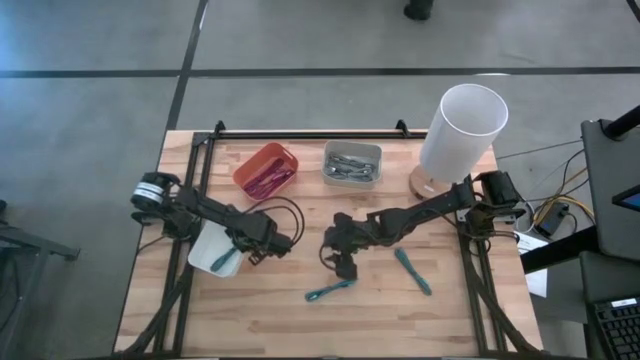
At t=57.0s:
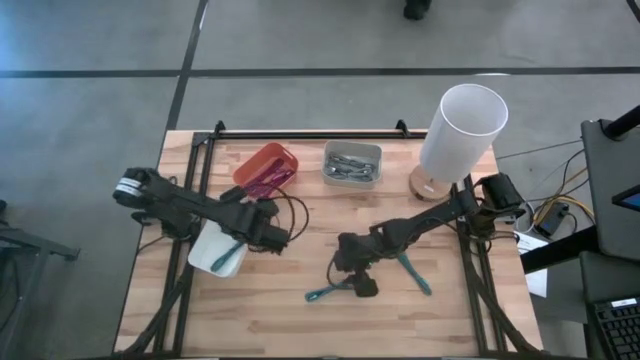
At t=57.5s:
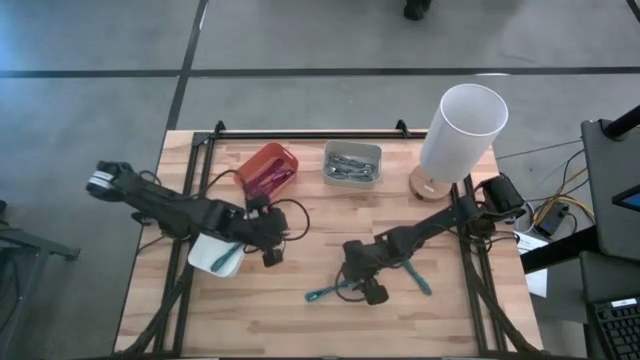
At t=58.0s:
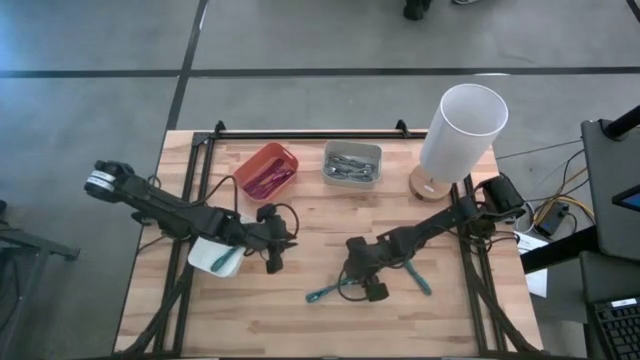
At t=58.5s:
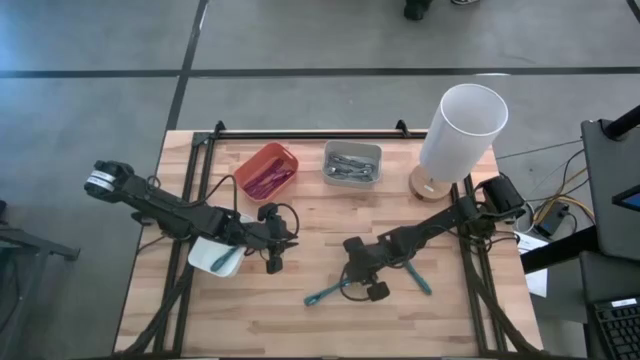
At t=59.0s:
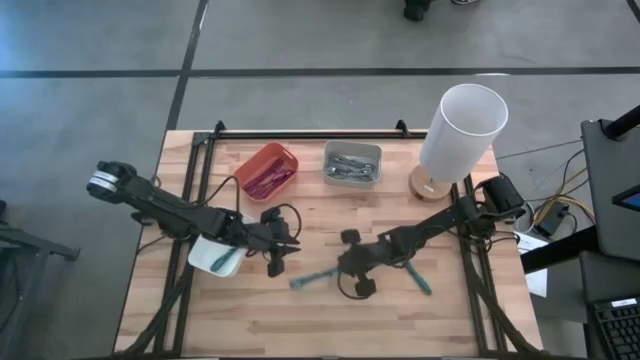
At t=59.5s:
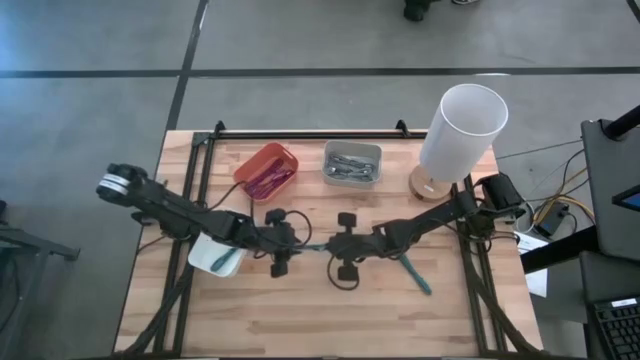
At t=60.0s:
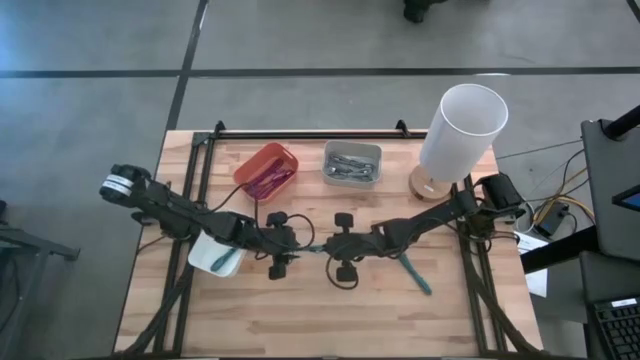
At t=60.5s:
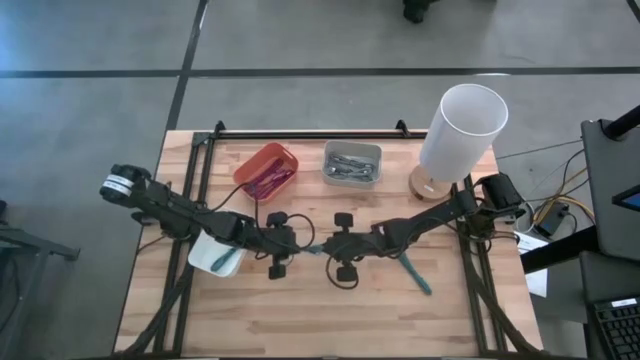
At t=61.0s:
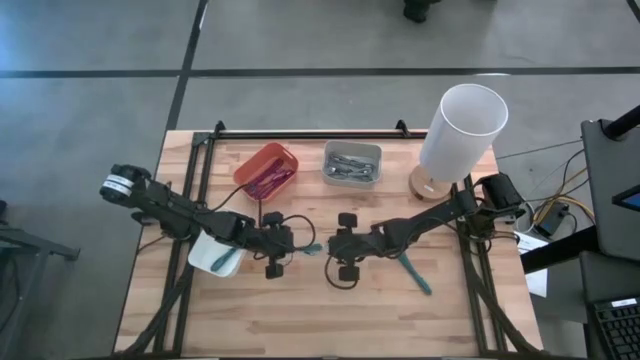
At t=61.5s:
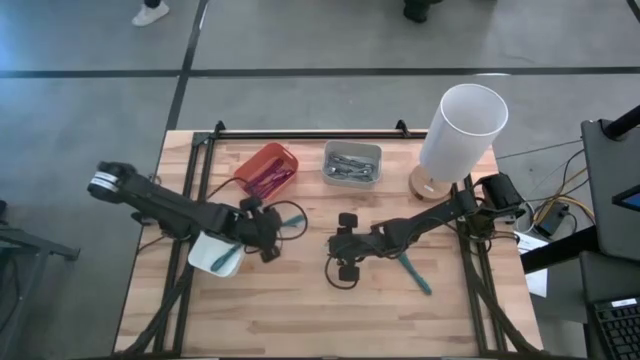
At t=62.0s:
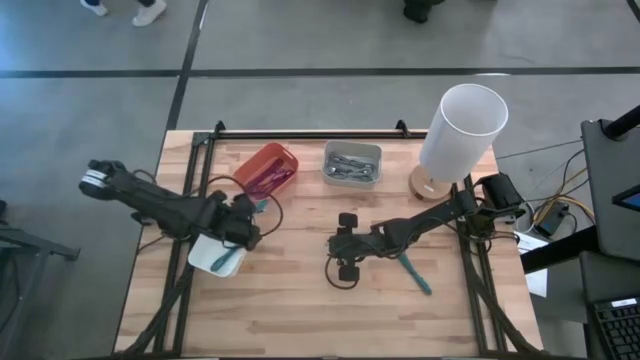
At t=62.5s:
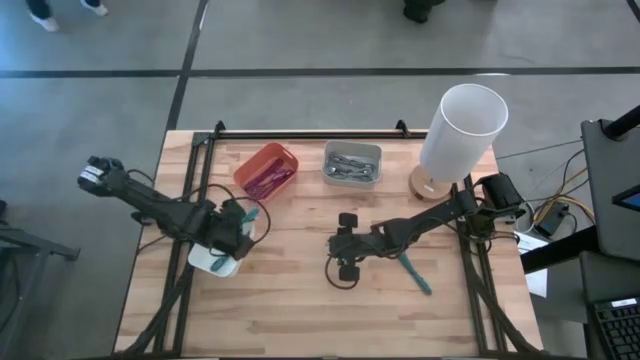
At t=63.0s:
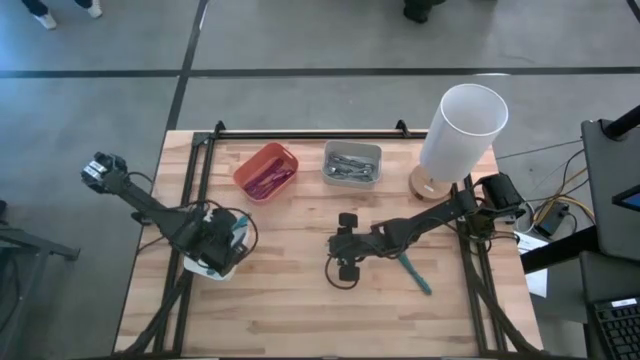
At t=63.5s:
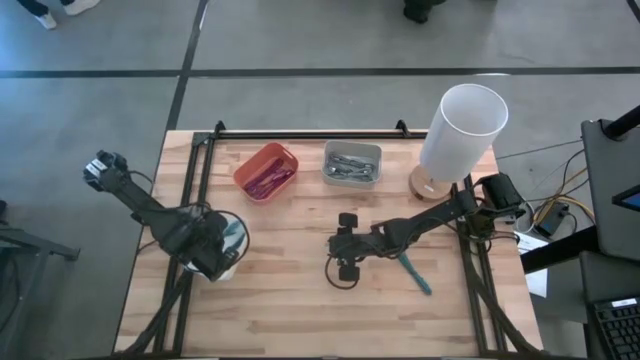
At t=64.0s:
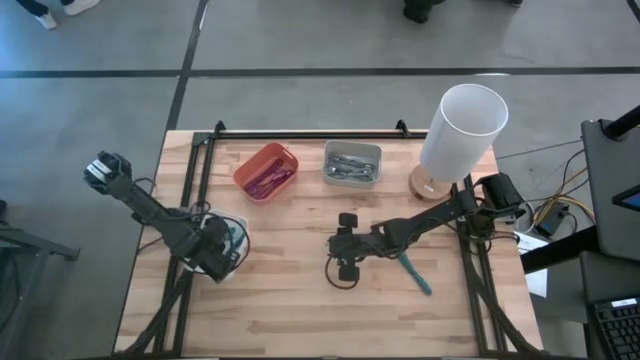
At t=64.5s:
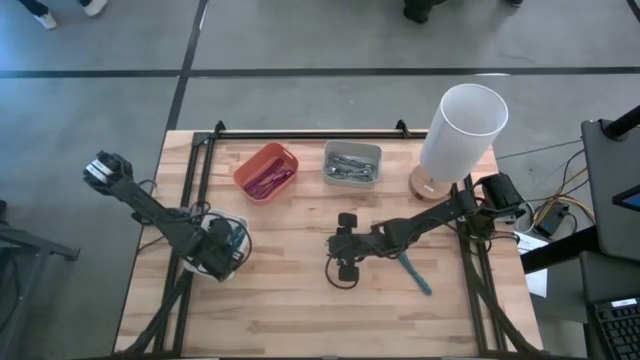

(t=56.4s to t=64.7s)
Task: Pick & Place USB Port
Put the left blue USB cable into the white bin

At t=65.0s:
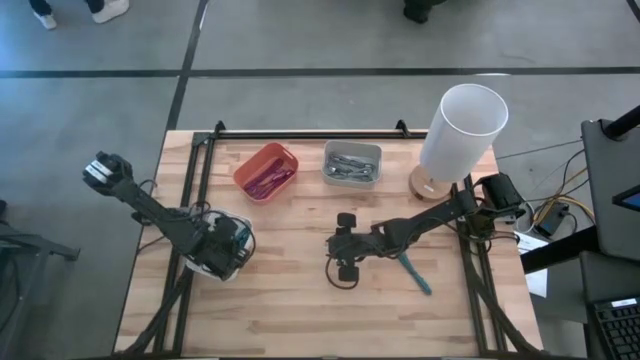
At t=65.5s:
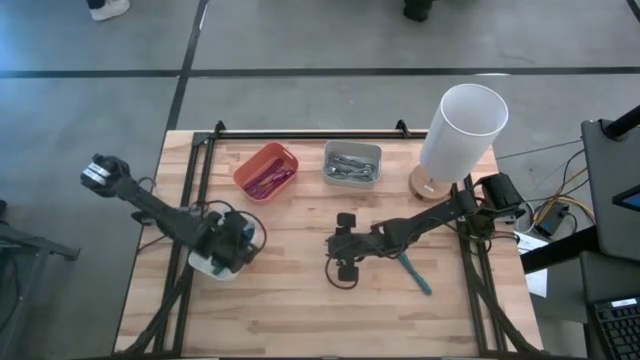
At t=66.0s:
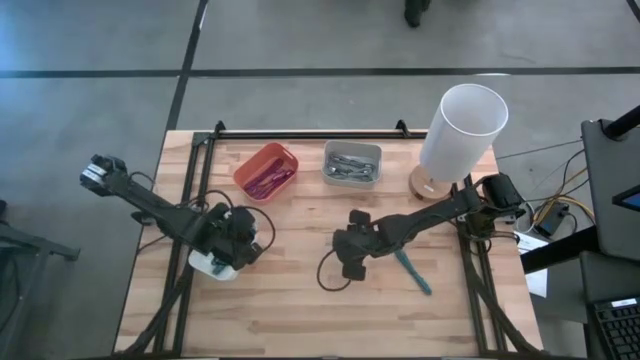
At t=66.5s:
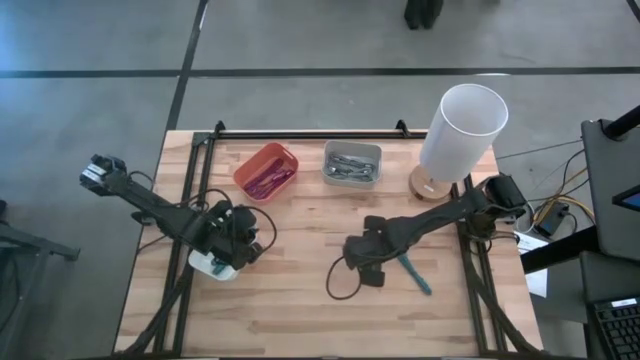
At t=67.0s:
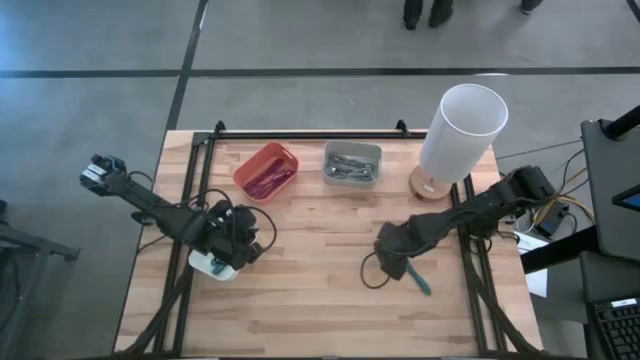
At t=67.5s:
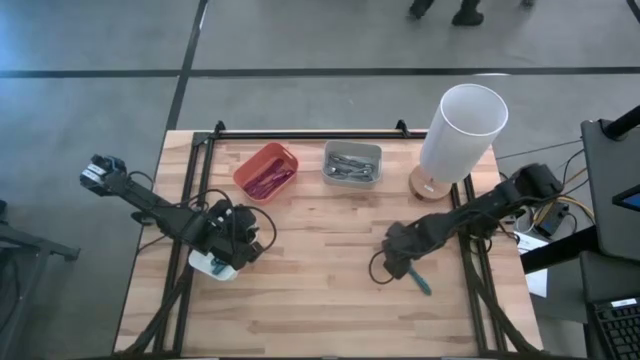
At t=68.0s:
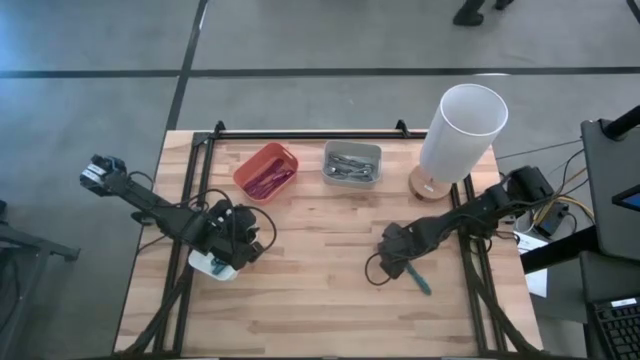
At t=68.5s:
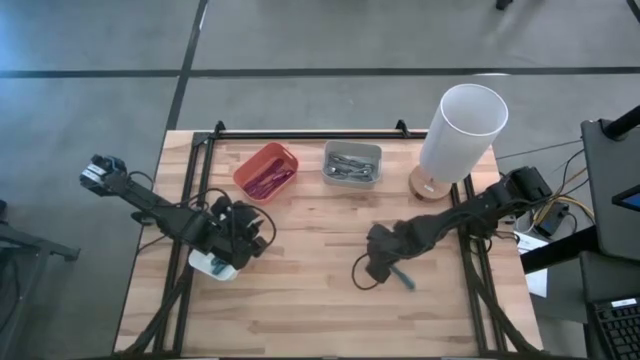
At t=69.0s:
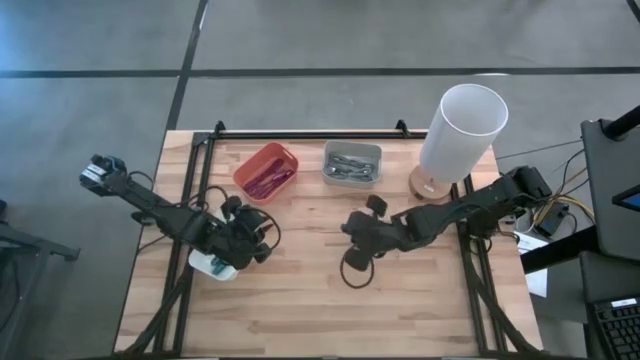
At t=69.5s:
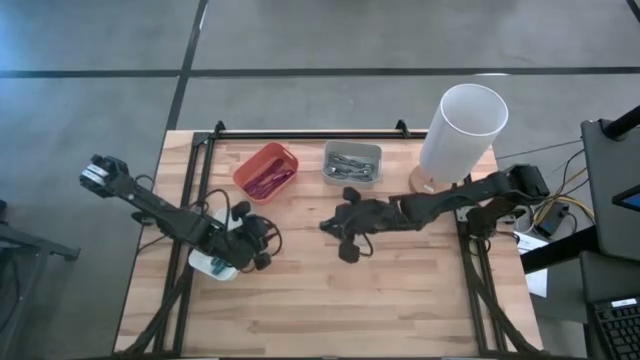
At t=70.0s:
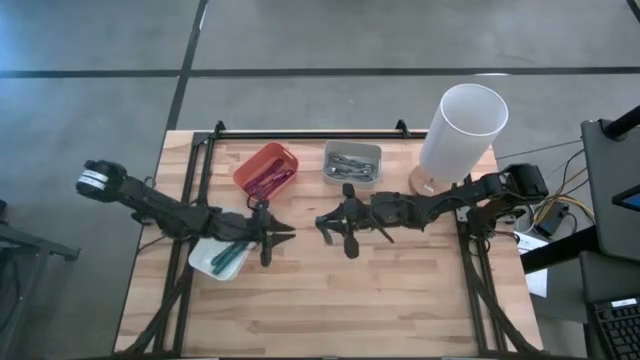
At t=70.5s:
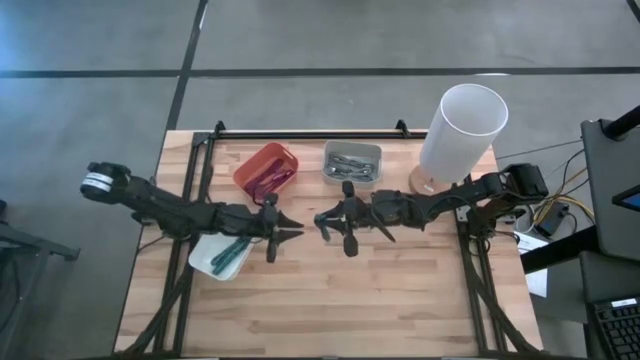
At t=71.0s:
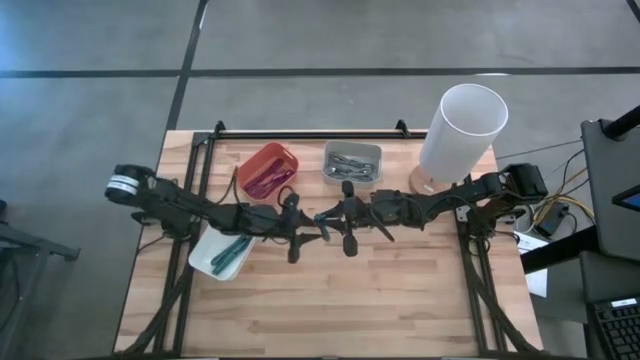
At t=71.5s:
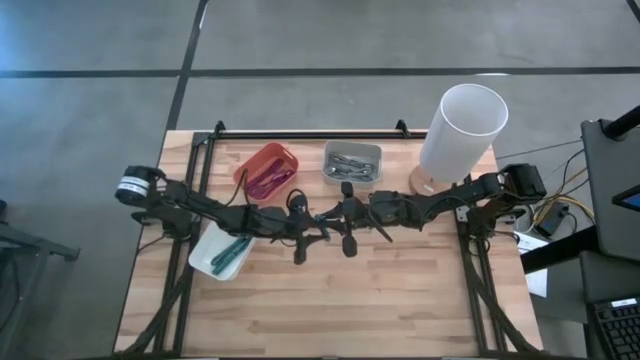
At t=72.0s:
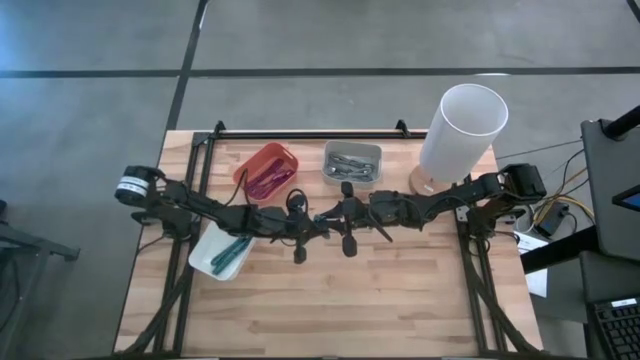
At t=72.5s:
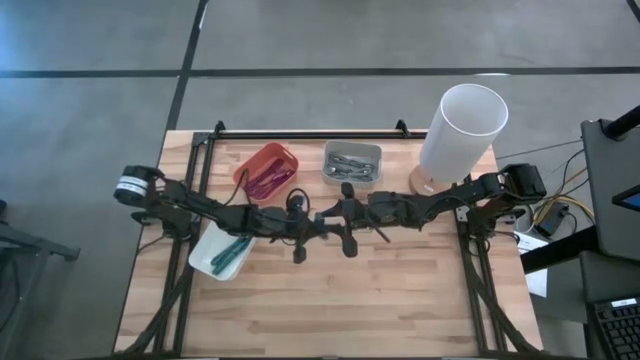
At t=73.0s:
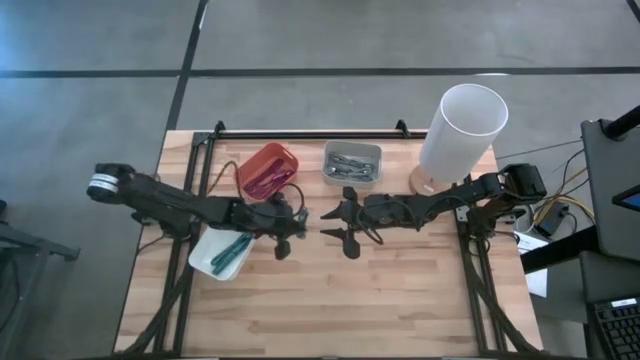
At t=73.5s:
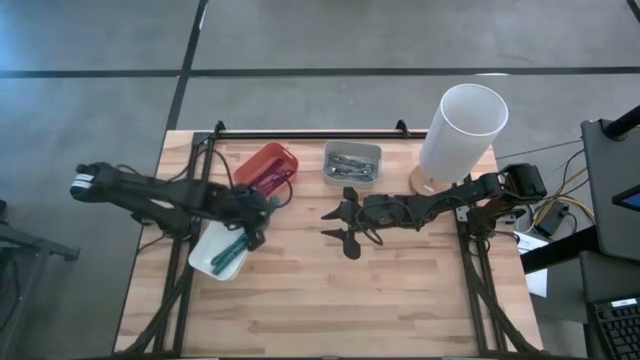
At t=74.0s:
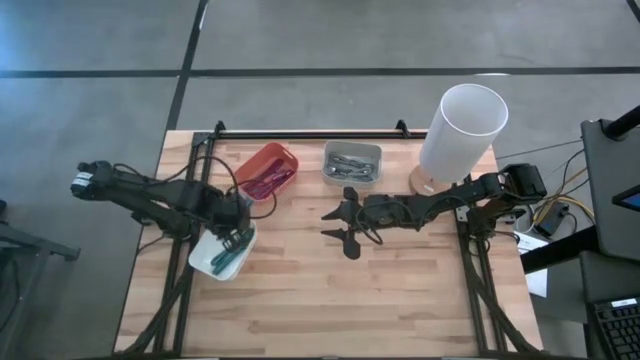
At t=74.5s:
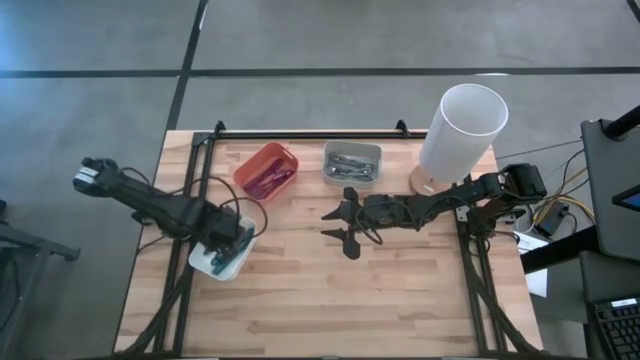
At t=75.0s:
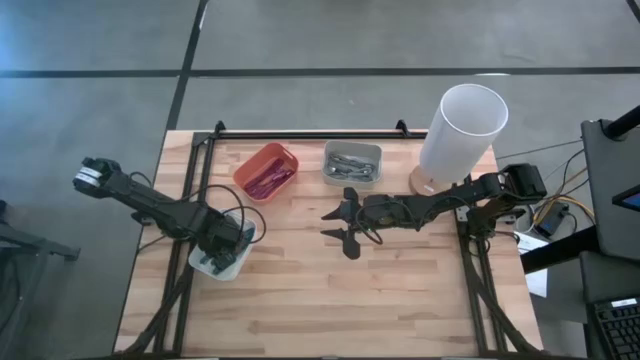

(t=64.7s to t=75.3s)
Put the blue USB cable into the white bin

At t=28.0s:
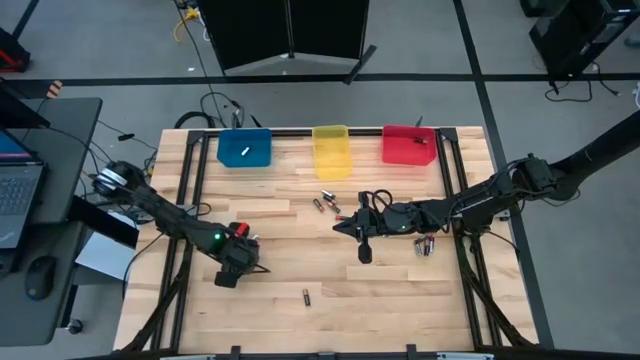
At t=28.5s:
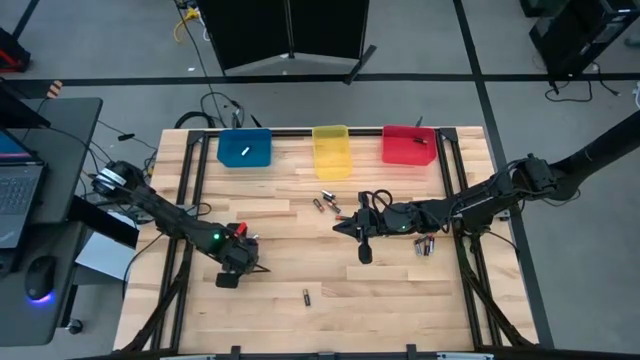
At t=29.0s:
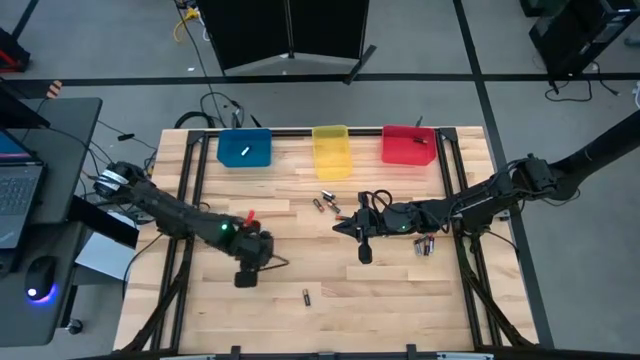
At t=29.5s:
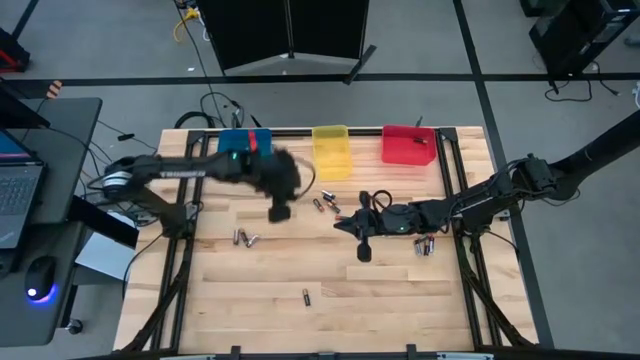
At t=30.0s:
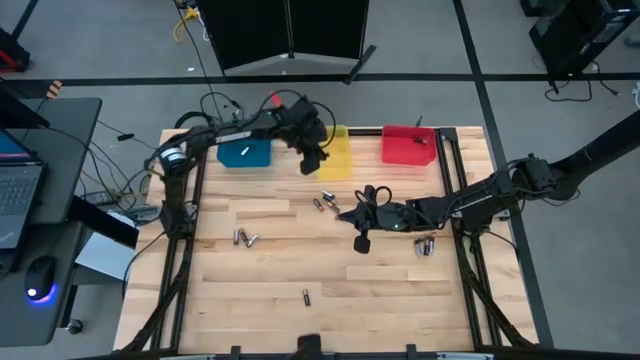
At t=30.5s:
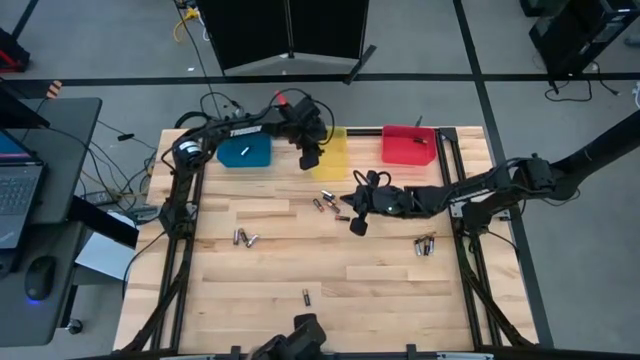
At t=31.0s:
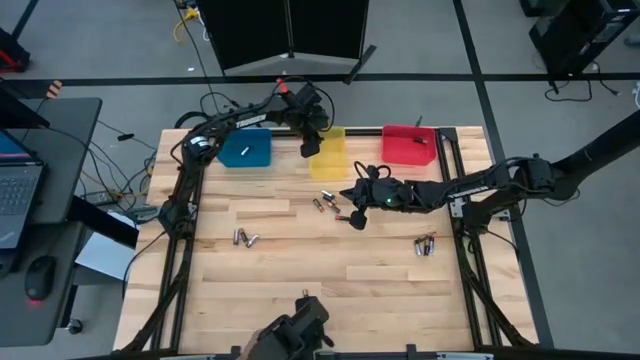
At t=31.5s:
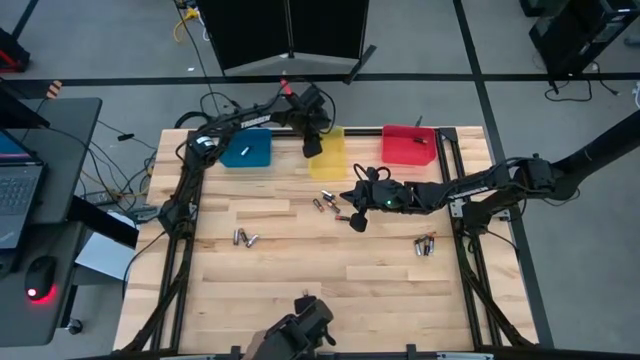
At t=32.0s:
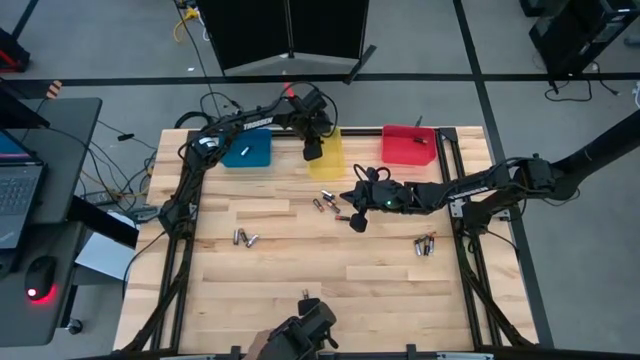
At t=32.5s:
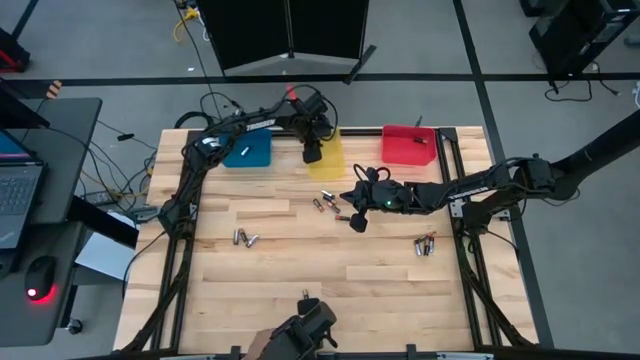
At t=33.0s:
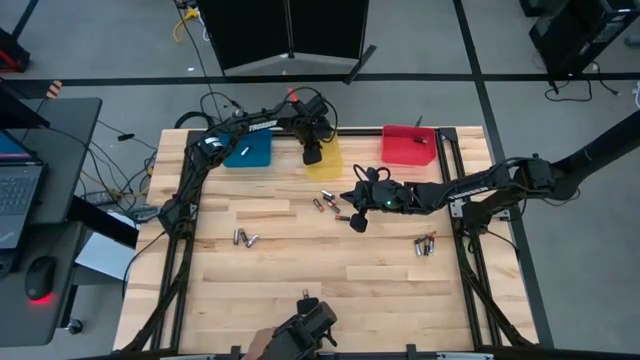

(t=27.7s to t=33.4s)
Task: Sort batteries
Put the black red battery into the yellow bin
